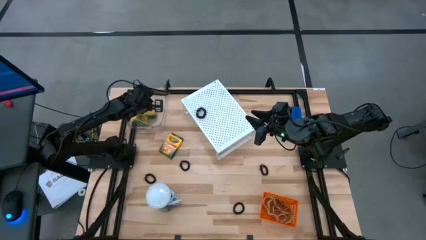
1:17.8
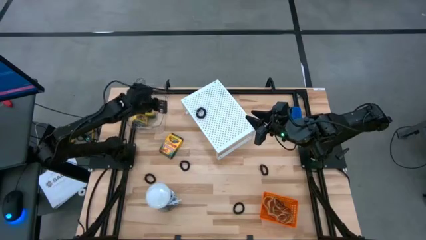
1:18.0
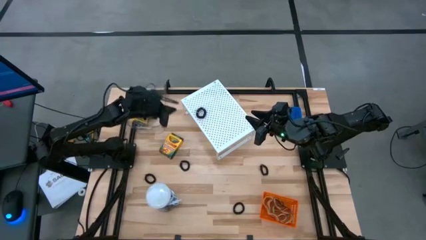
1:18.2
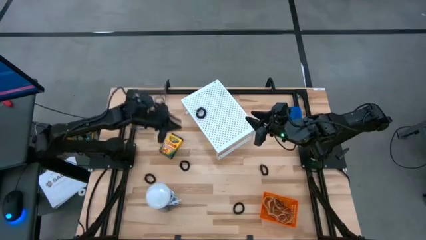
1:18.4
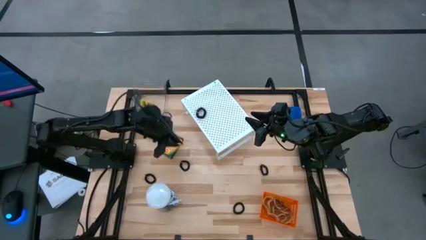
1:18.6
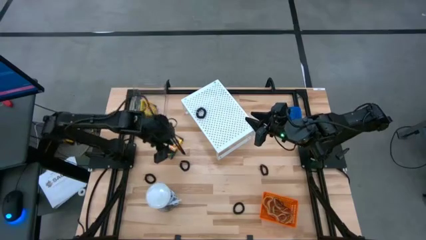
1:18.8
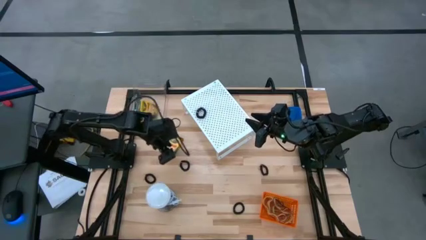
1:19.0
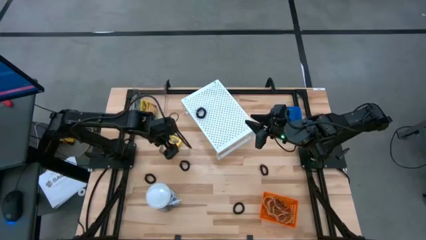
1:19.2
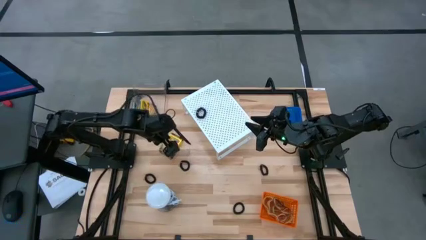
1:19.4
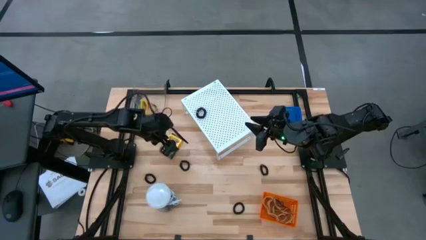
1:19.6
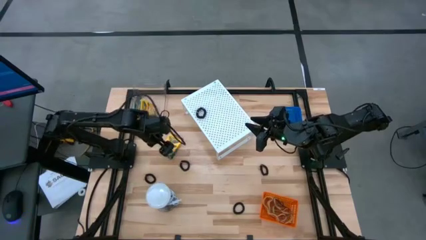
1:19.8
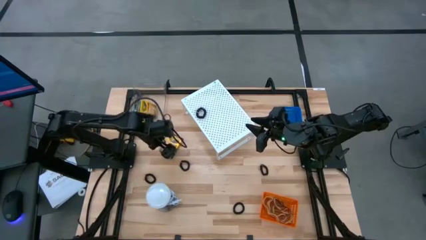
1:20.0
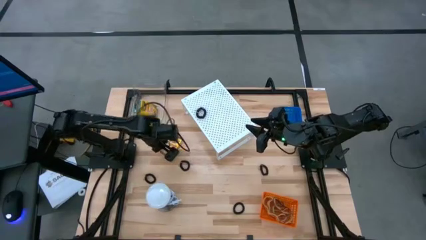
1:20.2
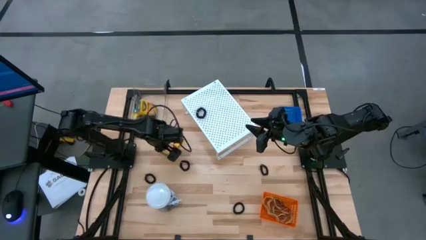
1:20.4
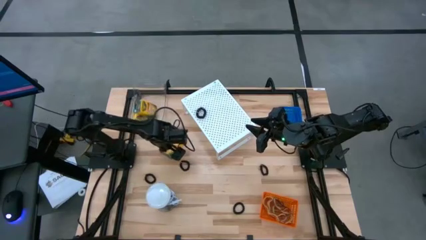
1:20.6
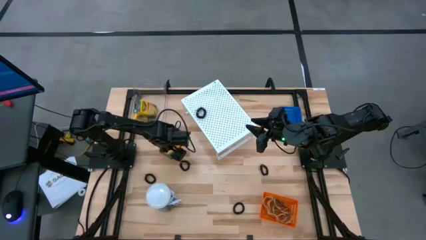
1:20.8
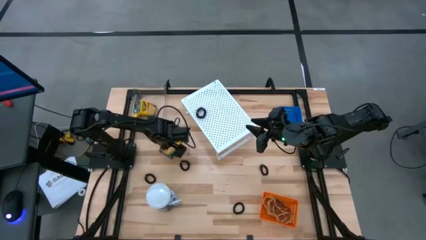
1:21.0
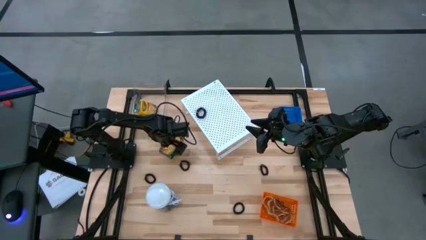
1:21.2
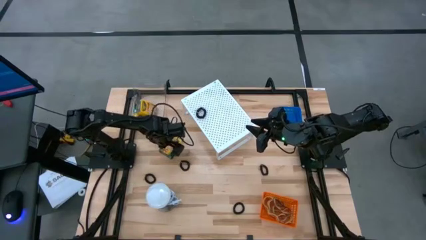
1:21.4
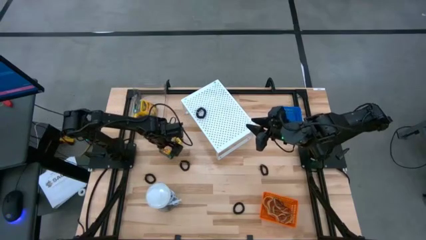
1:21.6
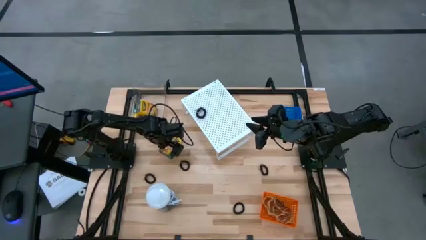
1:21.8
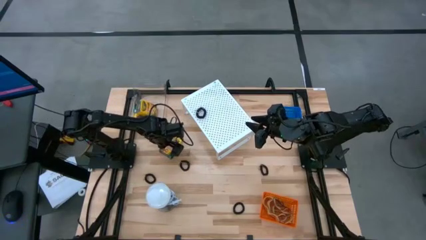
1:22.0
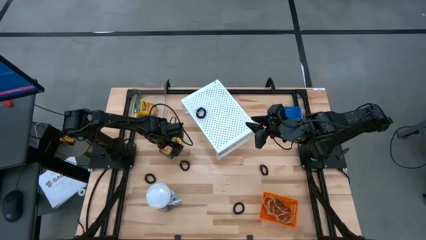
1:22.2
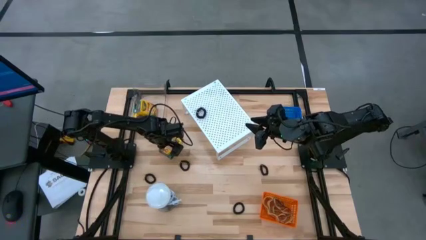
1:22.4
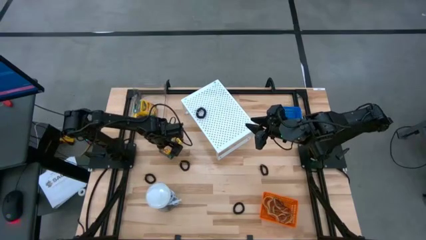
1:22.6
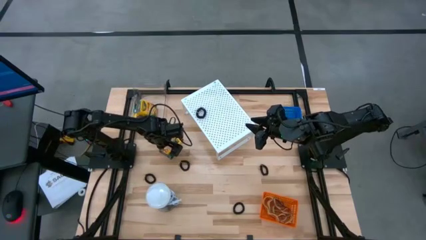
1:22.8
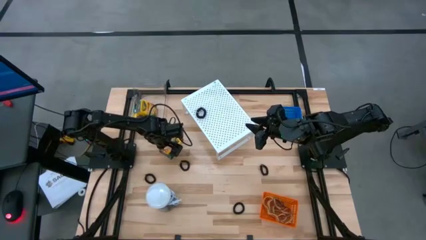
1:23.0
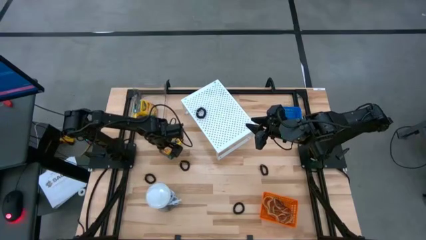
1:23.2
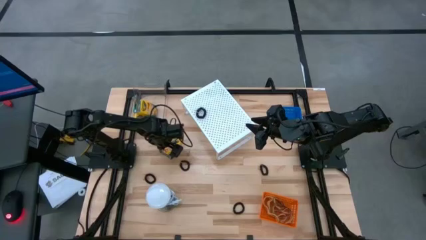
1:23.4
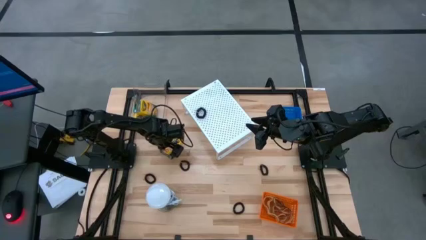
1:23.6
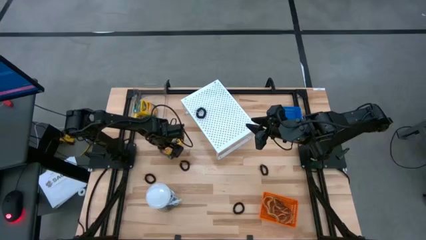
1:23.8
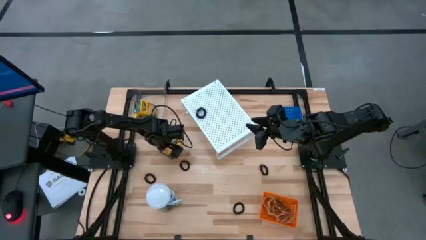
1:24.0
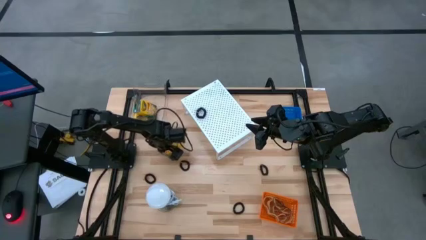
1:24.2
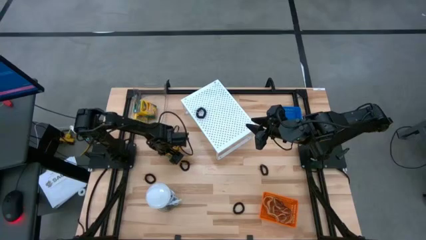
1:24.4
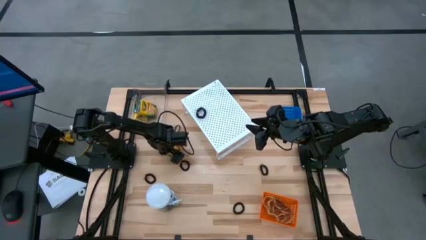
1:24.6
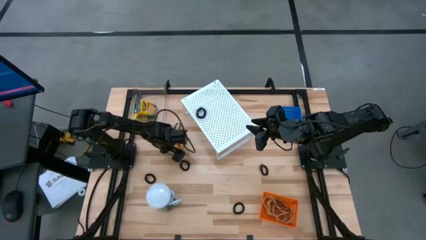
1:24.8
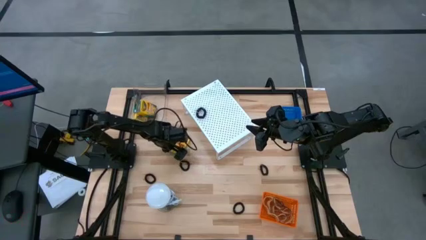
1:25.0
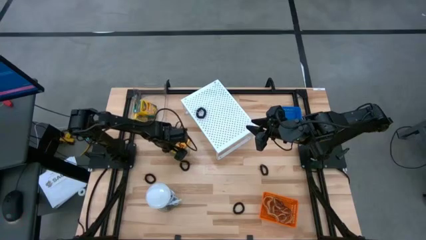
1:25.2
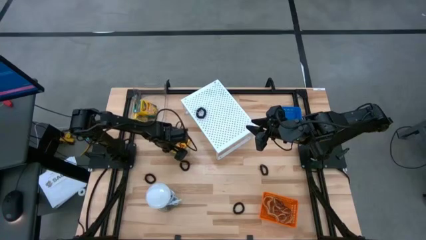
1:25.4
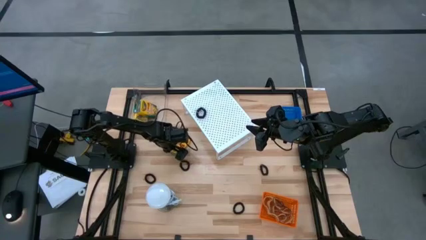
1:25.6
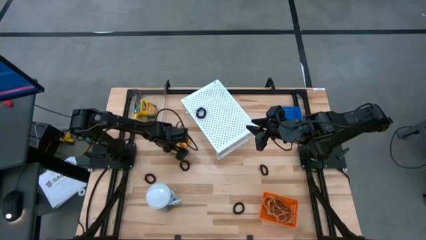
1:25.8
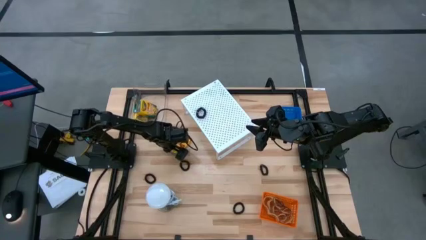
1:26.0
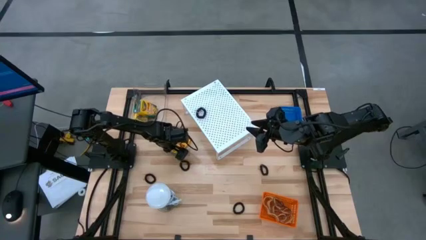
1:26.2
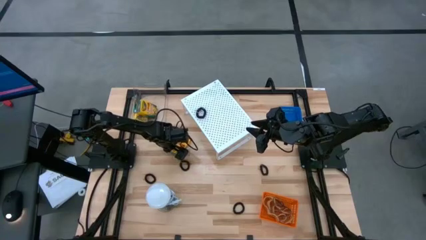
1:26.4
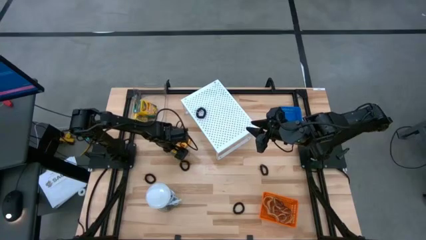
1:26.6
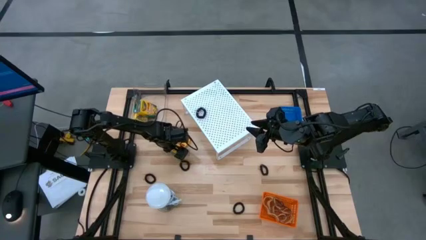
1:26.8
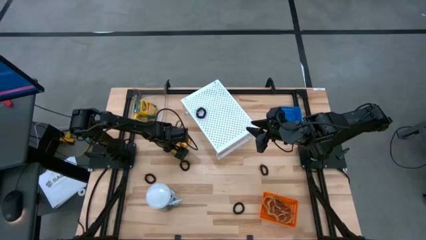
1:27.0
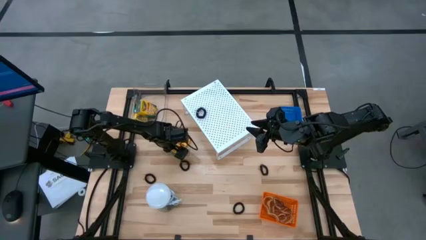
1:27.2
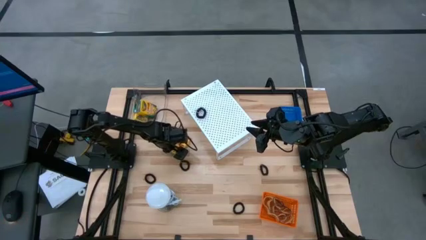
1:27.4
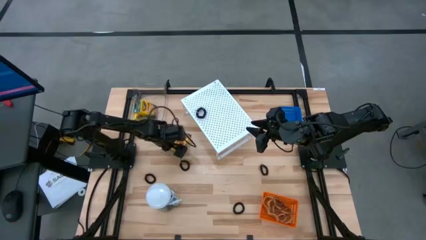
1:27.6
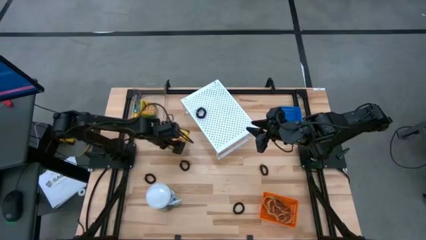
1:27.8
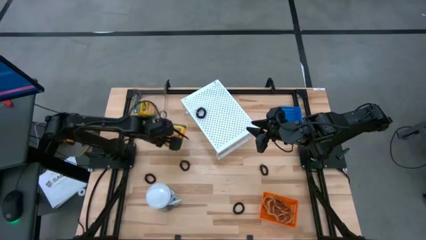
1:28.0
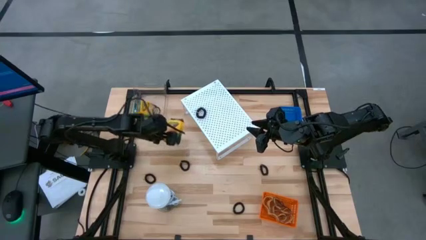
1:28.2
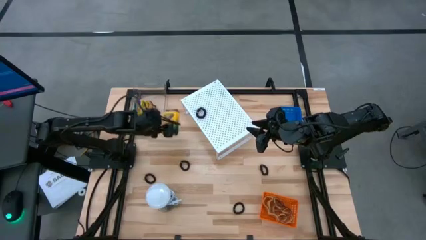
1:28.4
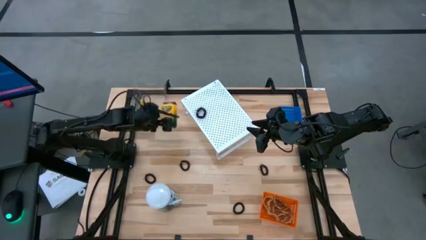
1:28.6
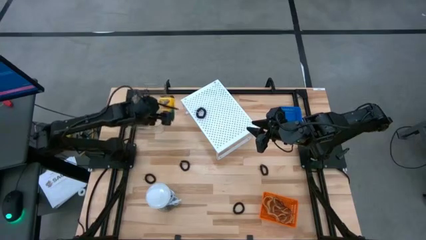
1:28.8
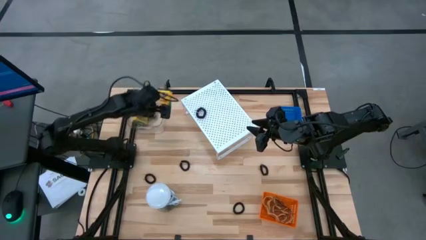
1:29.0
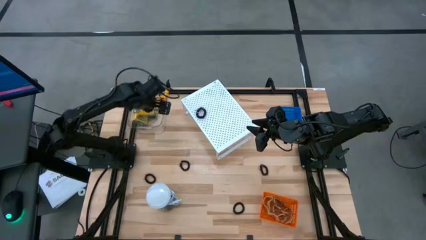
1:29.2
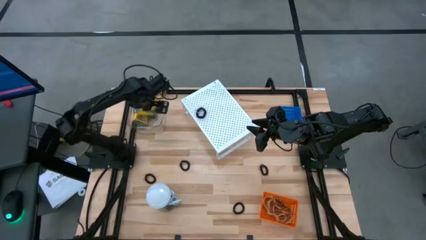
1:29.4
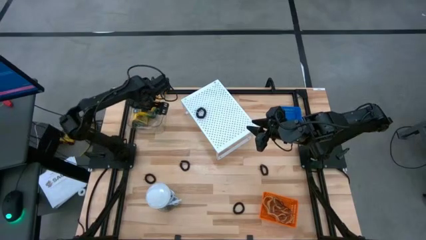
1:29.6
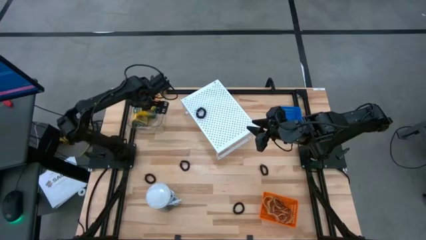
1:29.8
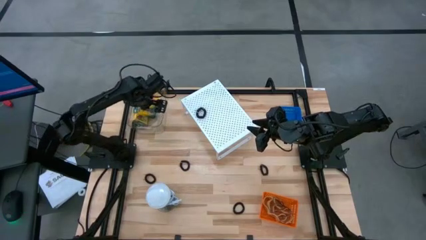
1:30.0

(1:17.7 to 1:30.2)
Task: Pick & Place Office Desk Supplies
Put the crayon box into the transparent bin
